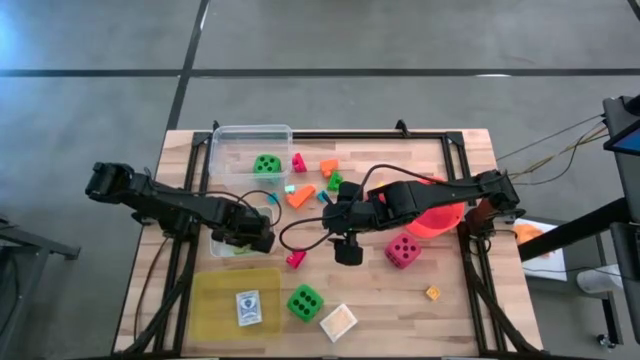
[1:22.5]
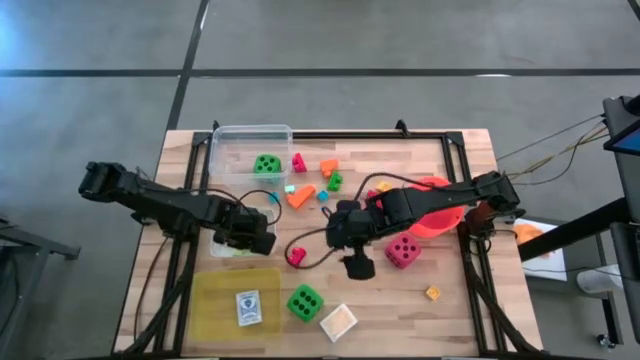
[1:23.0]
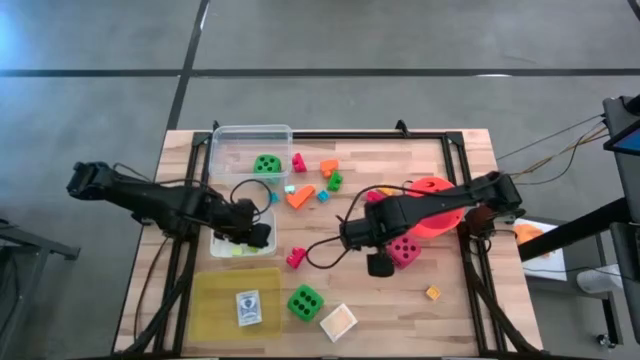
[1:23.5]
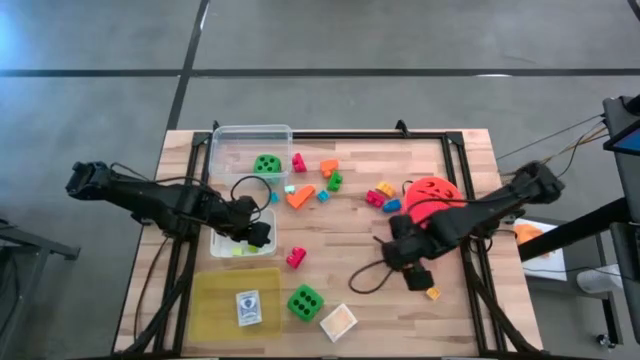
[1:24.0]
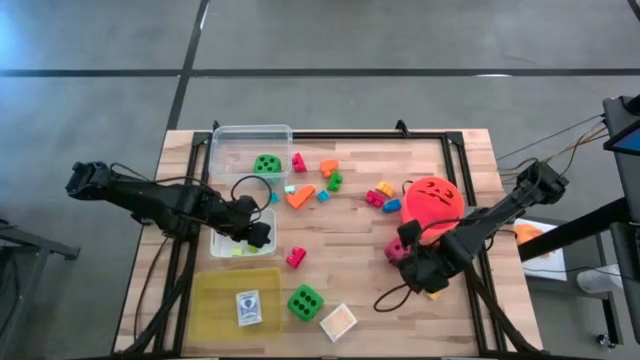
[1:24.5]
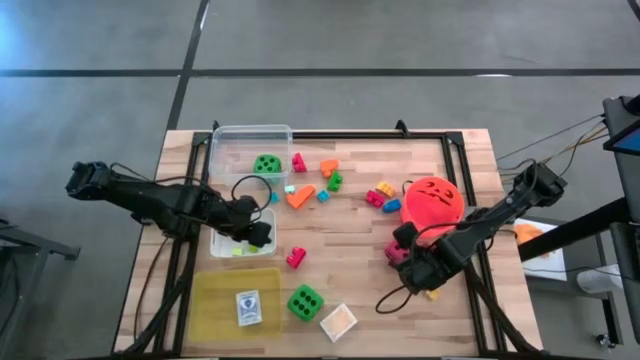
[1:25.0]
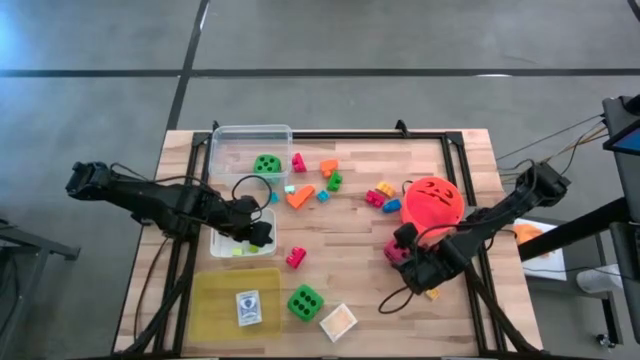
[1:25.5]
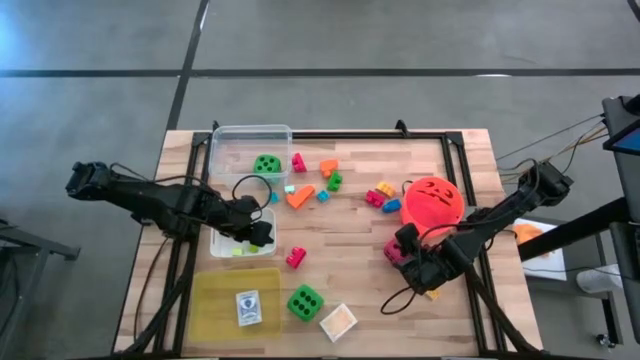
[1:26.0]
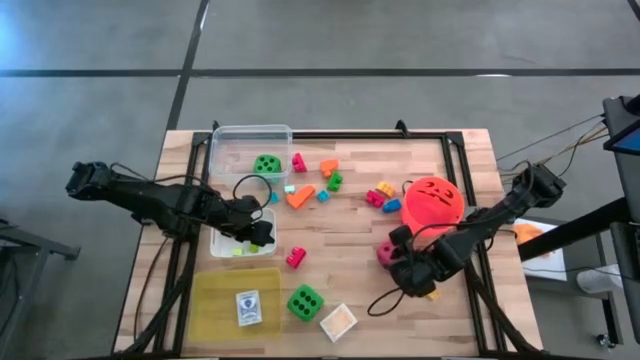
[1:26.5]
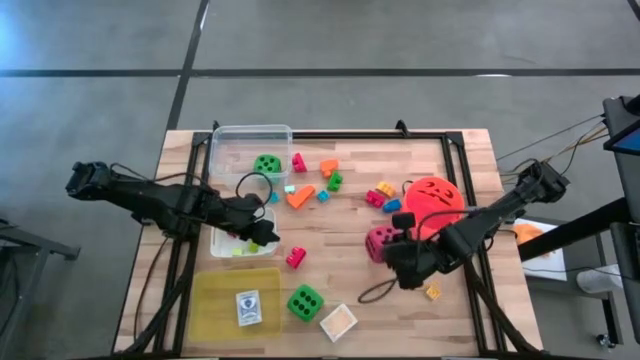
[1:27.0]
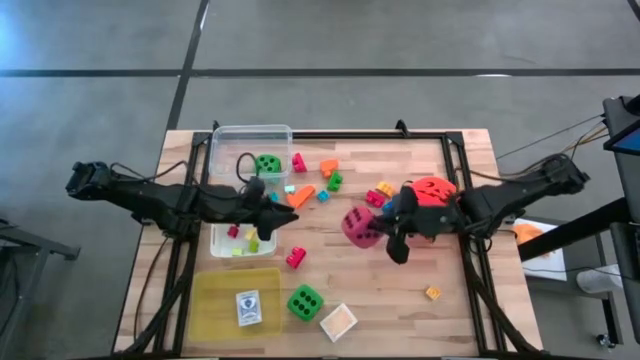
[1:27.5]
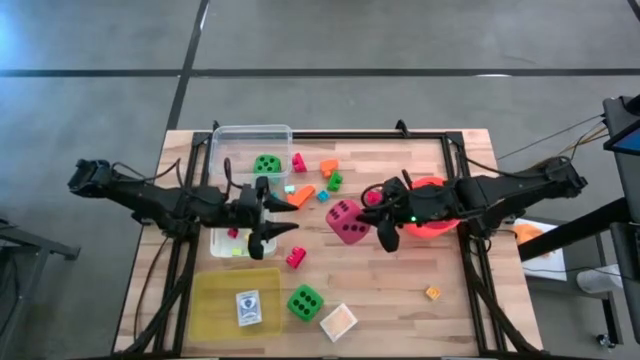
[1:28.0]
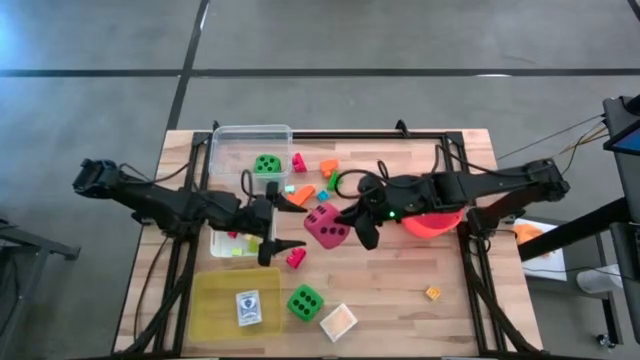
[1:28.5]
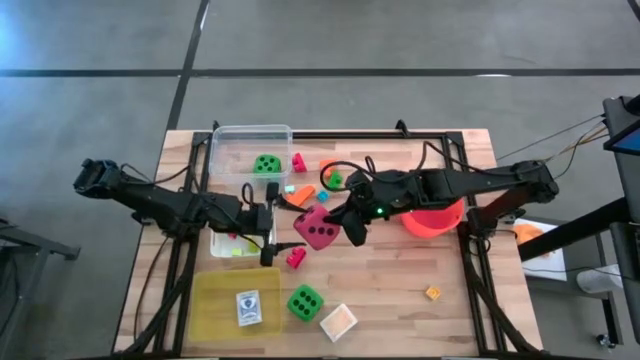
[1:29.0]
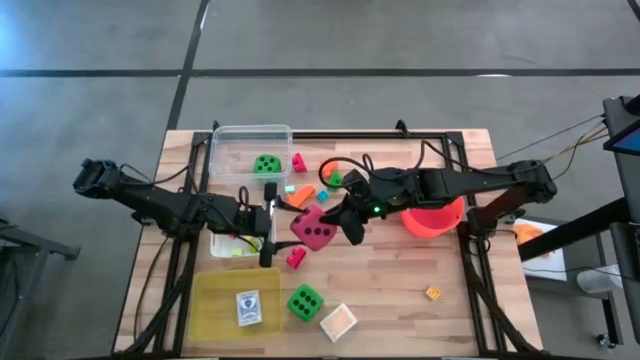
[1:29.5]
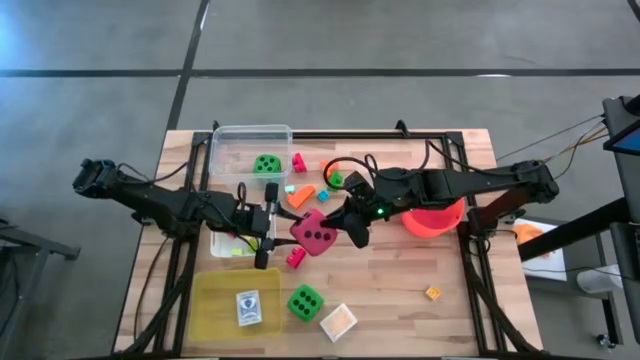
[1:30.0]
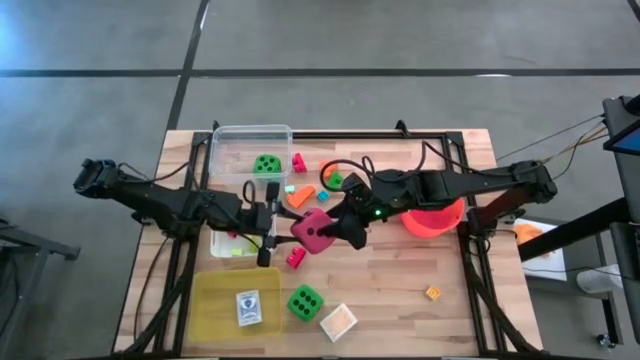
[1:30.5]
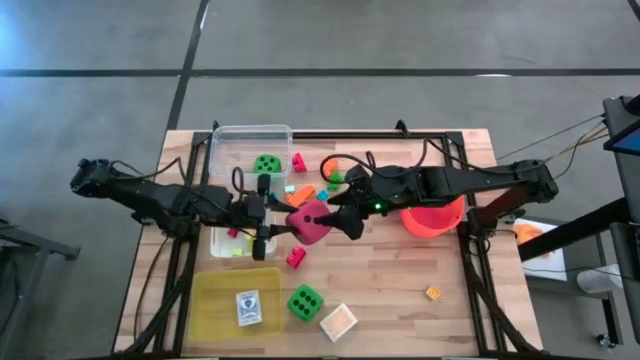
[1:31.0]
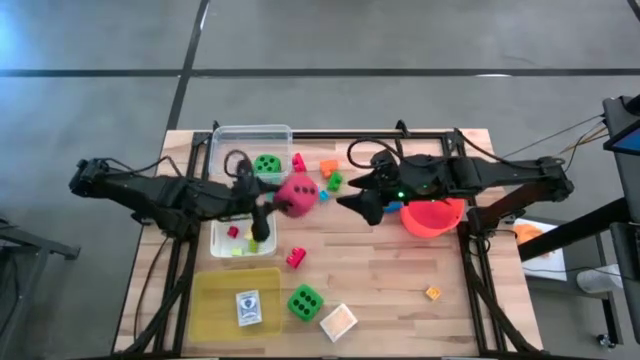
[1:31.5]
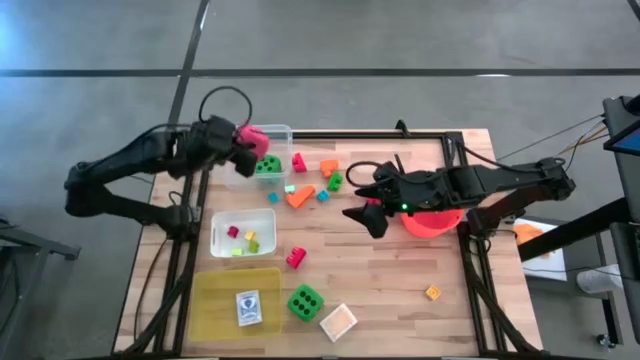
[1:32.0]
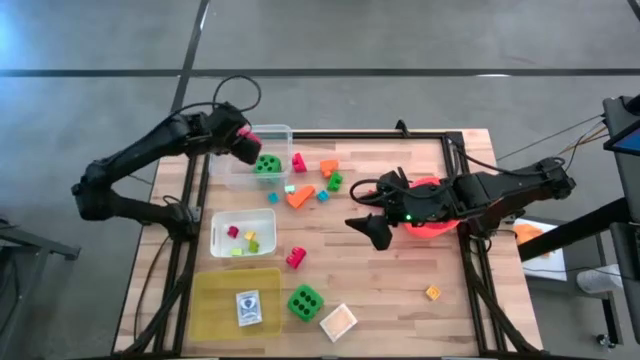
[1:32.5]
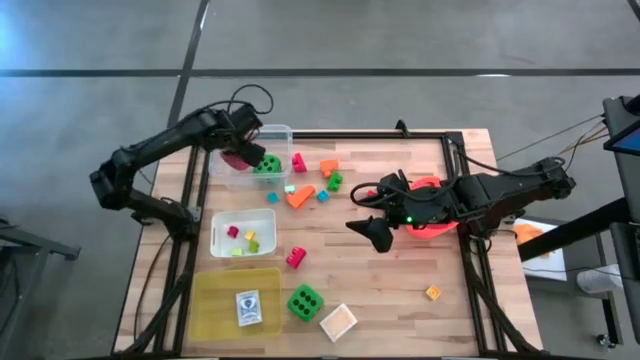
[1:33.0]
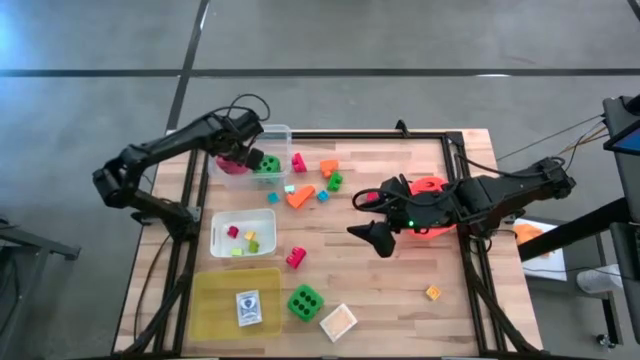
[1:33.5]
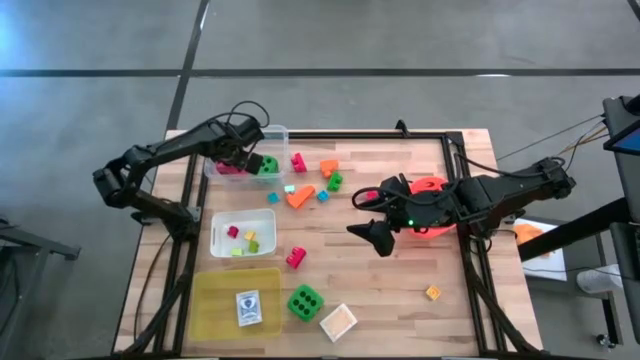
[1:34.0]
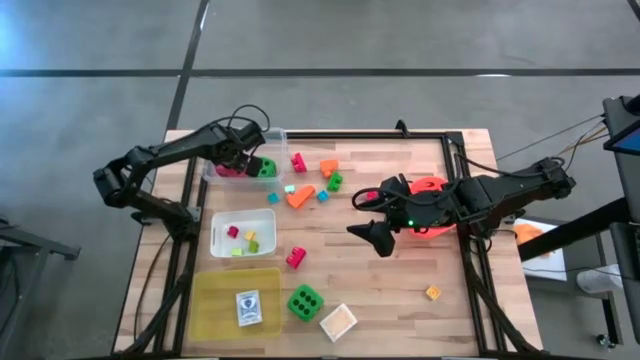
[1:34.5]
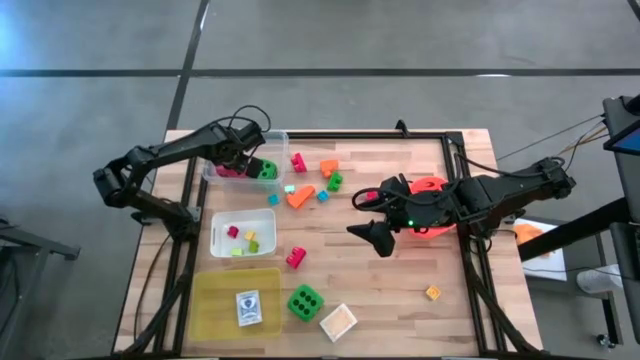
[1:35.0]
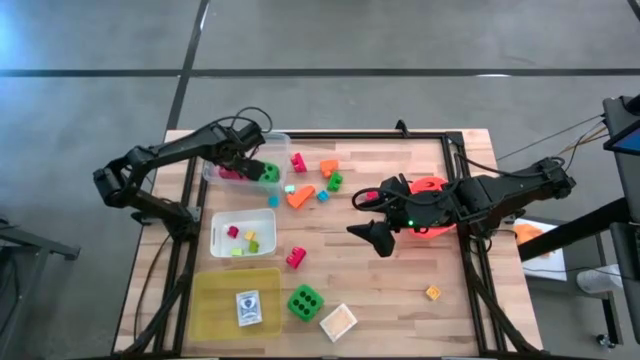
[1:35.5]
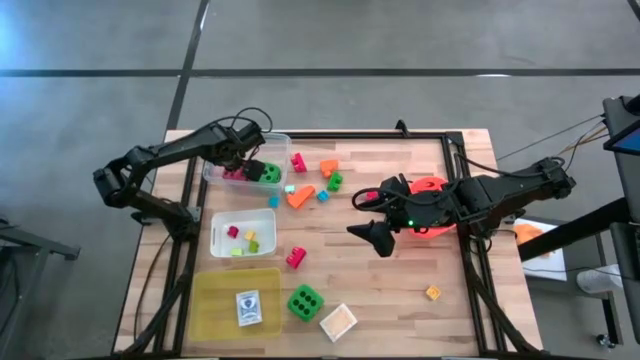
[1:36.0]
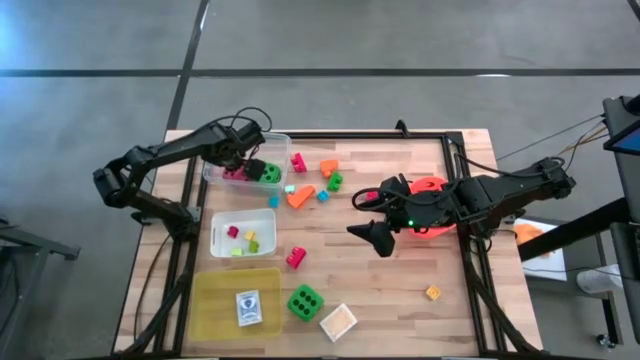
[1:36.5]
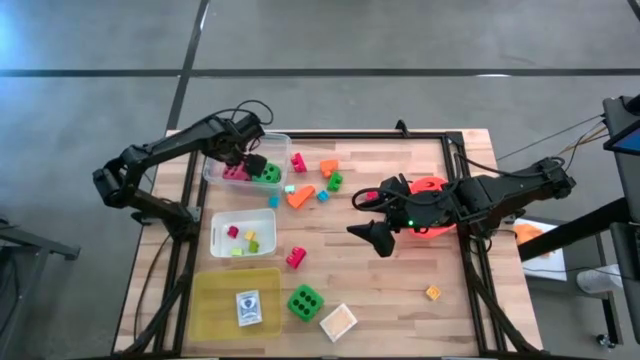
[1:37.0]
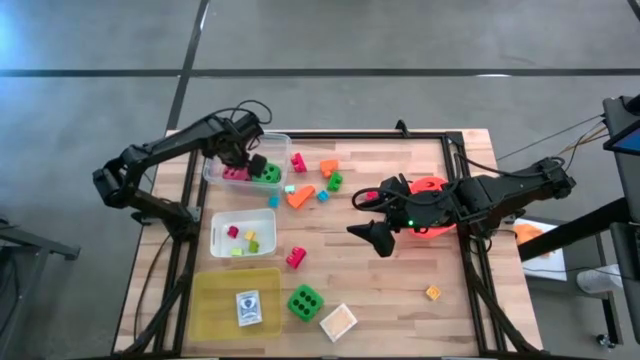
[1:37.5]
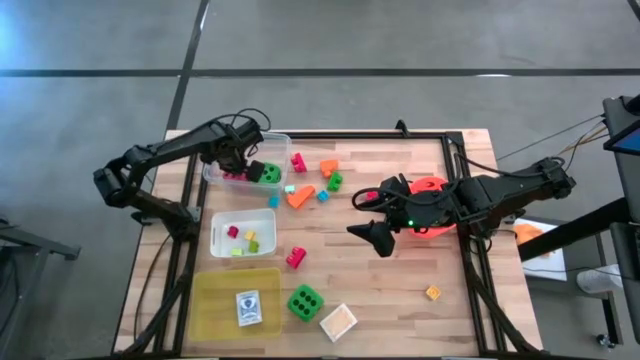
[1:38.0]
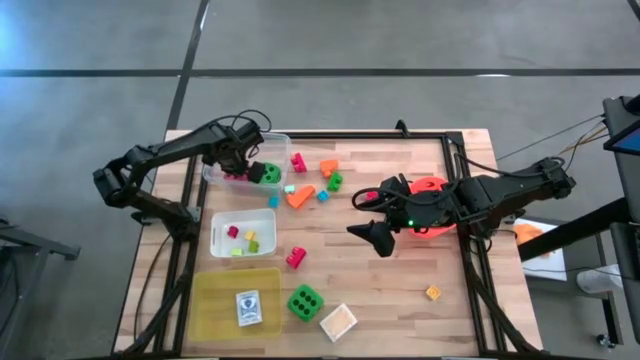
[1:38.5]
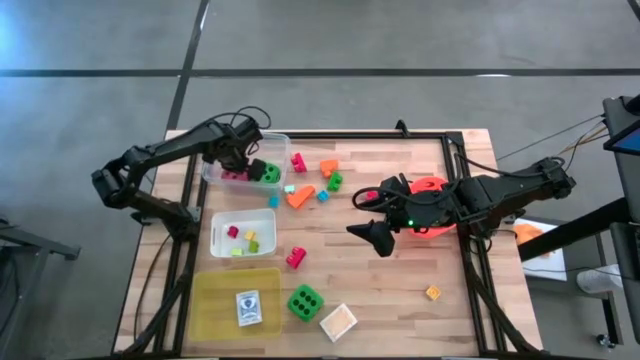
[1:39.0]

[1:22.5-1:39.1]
Task: Pick & Place Toys
Put the red dice into the transparent bin

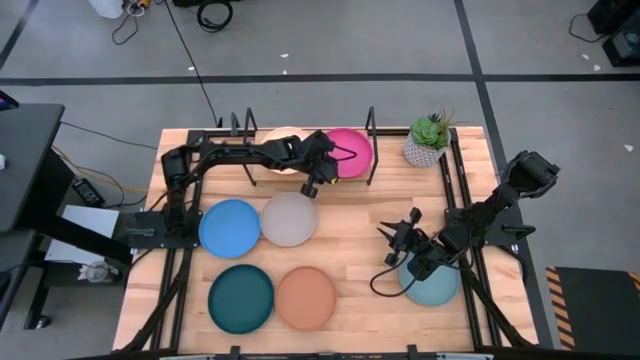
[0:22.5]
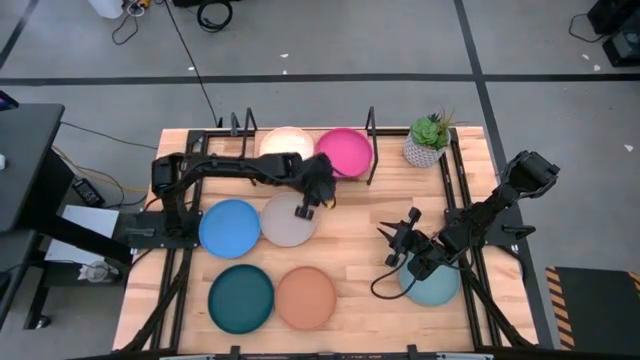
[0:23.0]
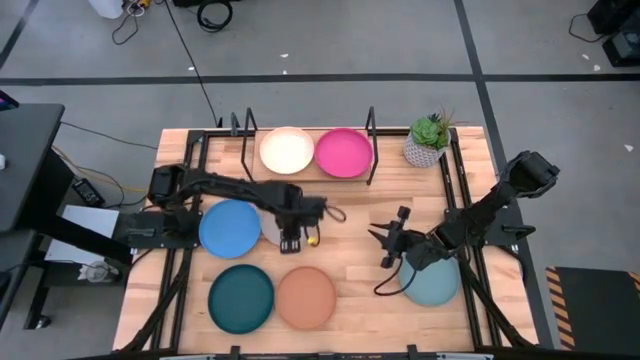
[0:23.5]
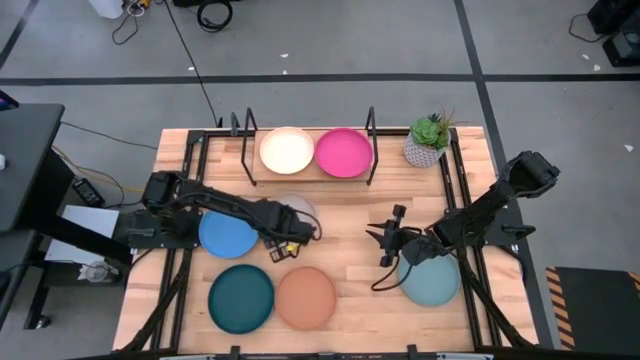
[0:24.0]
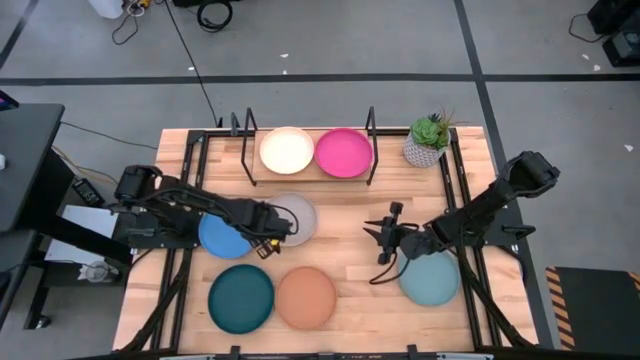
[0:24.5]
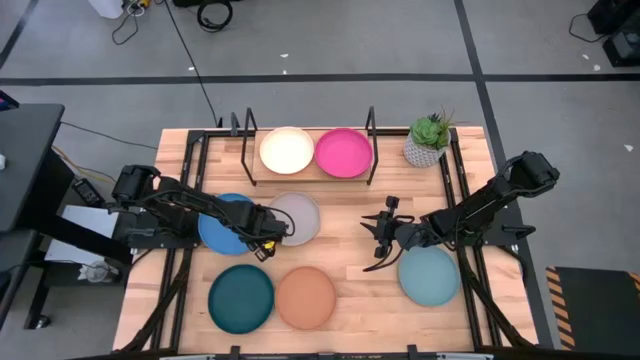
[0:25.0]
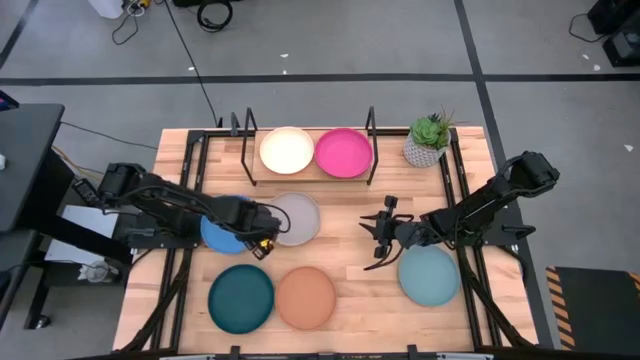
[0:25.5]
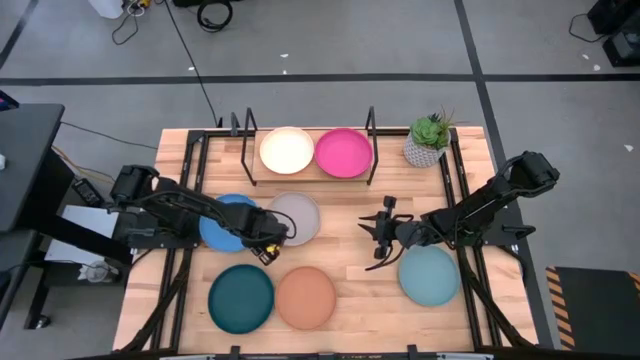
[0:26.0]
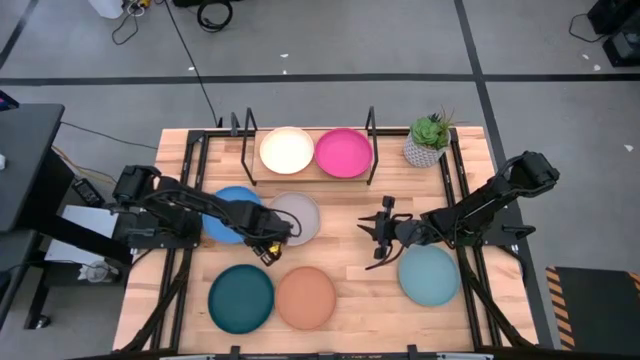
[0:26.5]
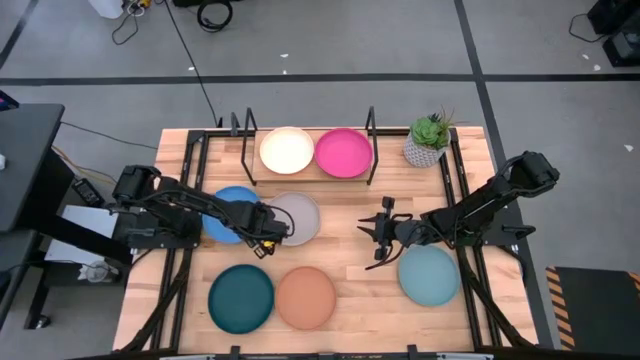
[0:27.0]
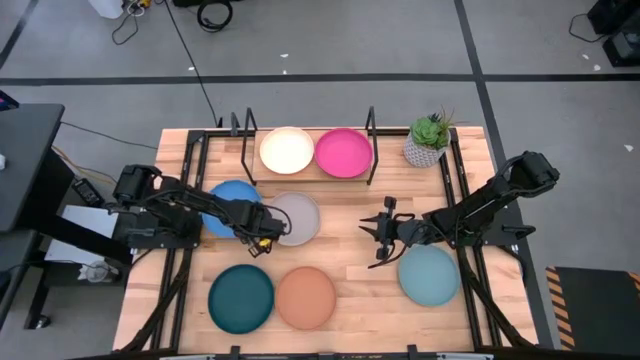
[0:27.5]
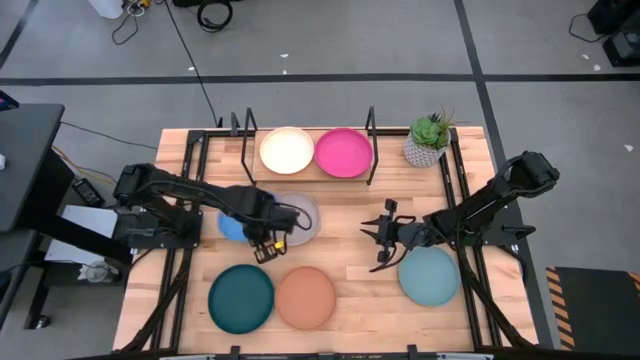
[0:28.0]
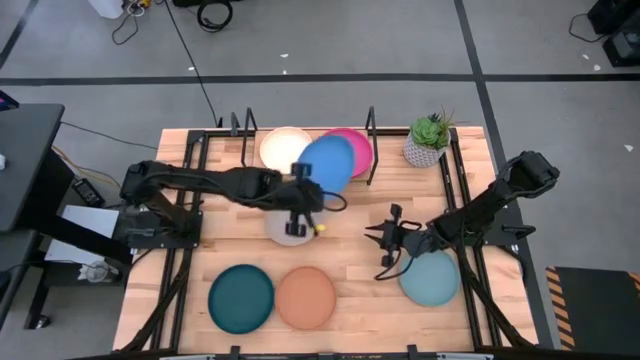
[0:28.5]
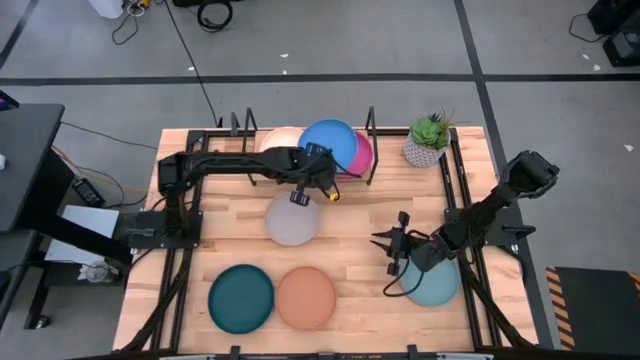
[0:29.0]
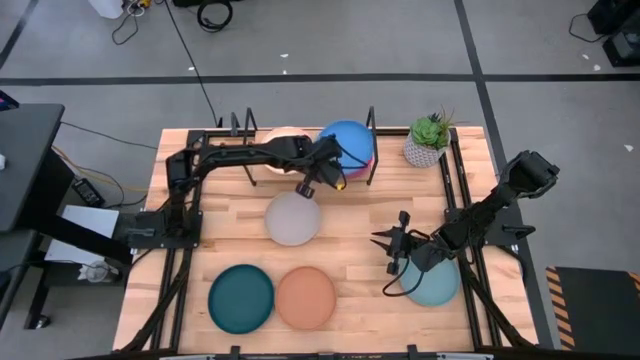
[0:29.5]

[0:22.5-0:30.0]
Task: Place and stack plates onto a shelf
Stack the blue plate on top of the pink plate on the shelf
